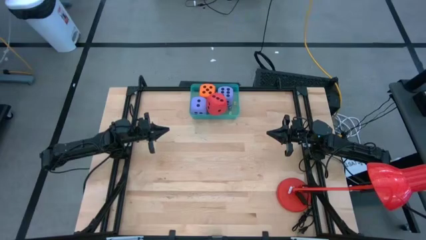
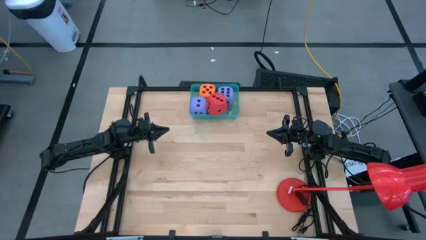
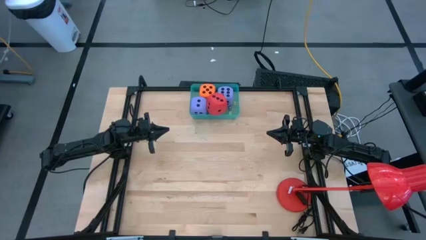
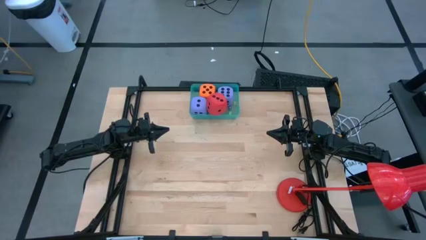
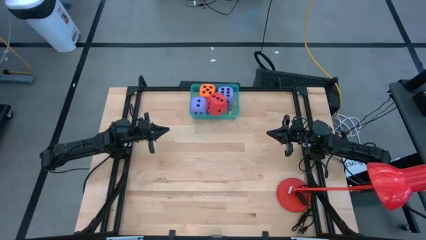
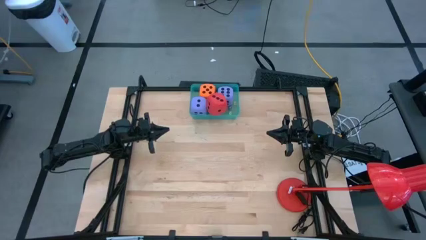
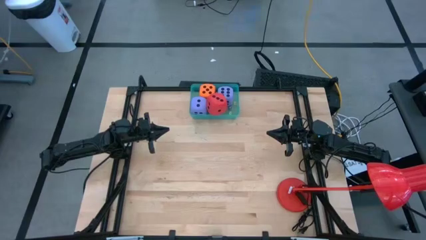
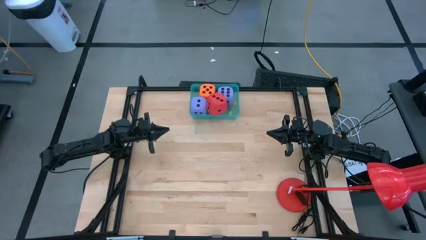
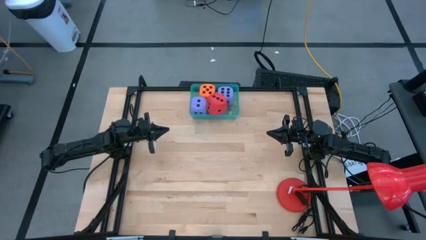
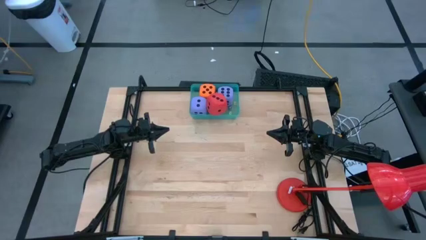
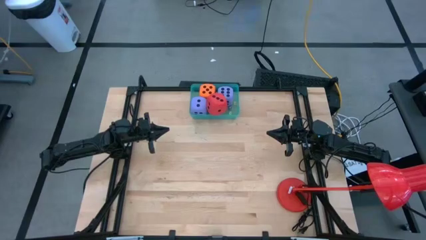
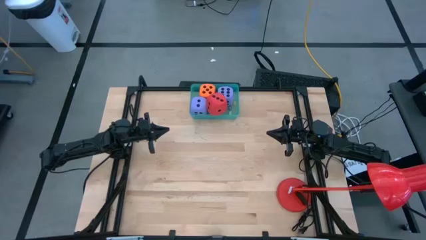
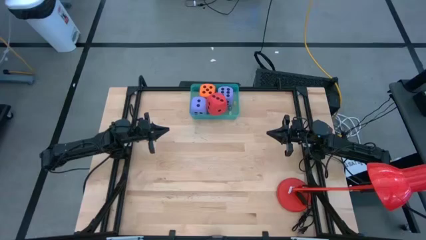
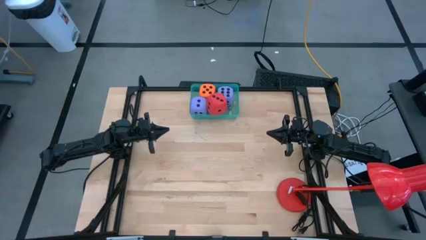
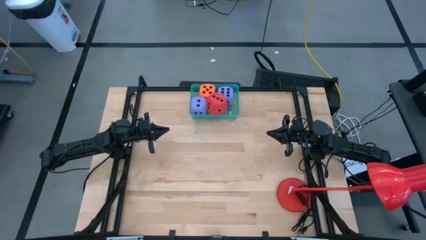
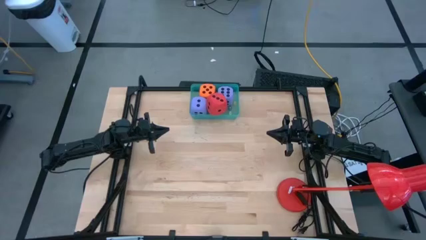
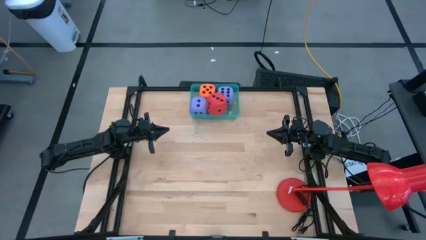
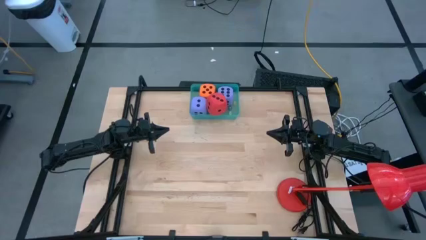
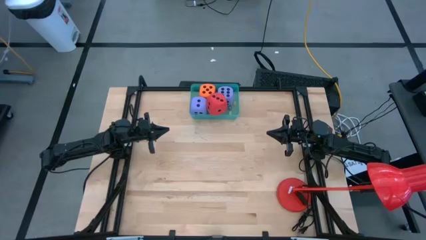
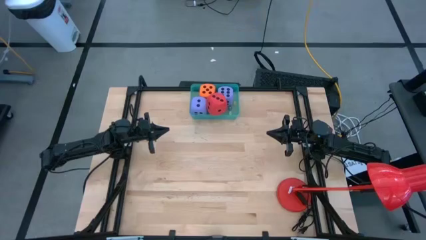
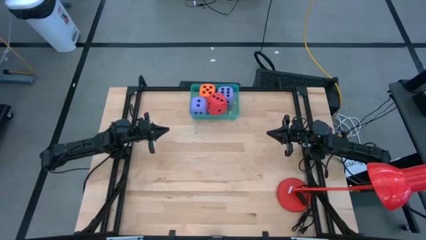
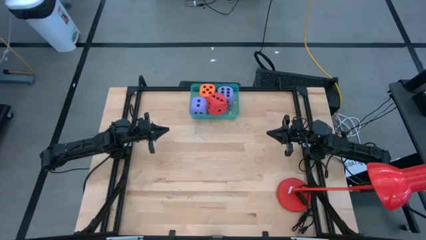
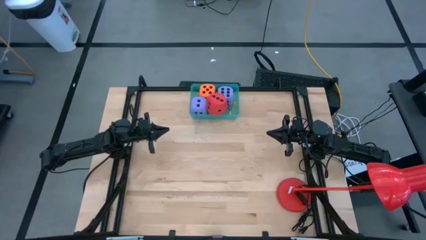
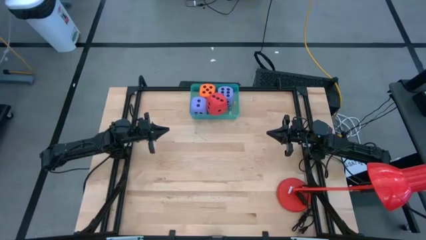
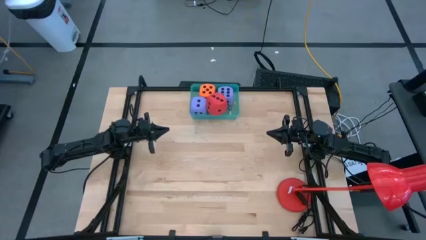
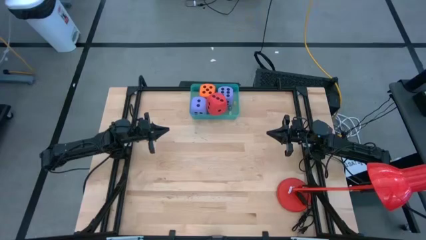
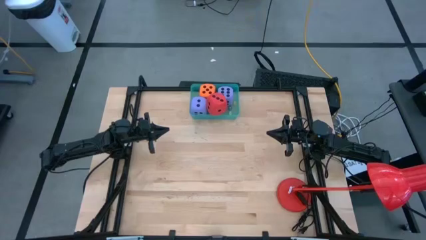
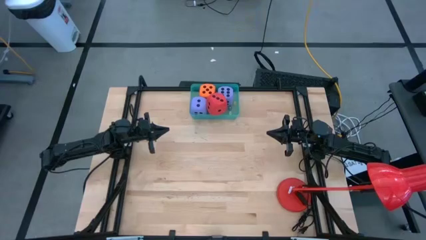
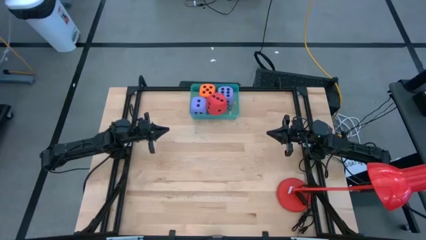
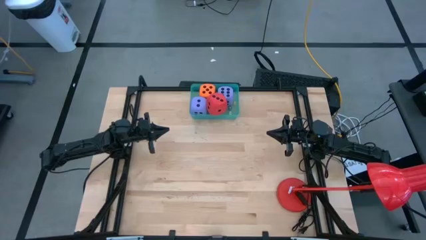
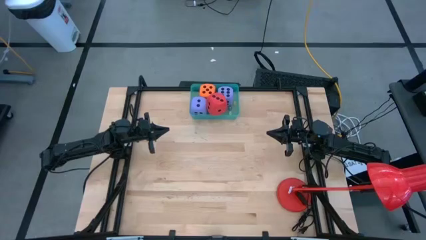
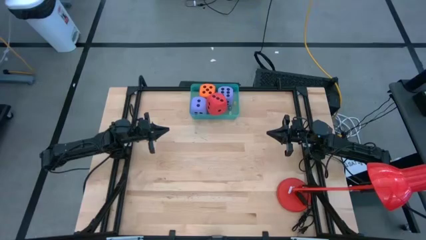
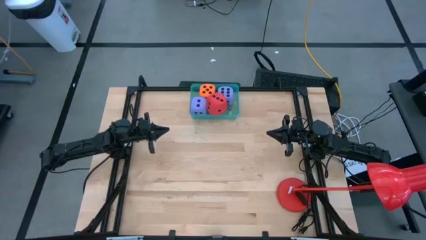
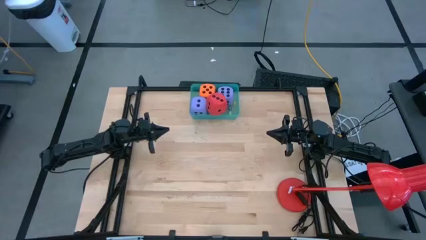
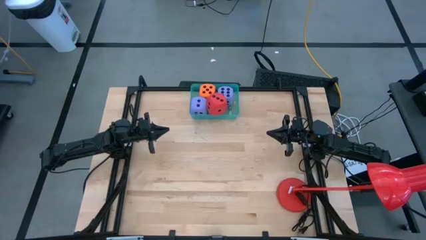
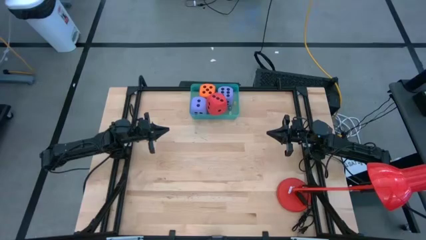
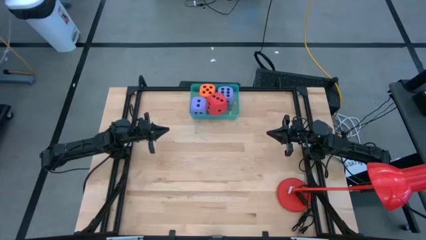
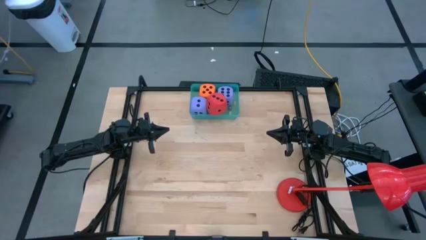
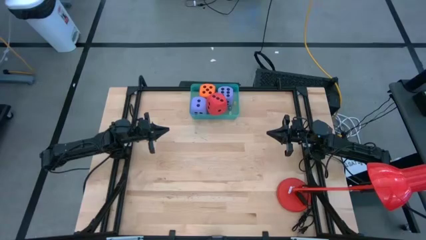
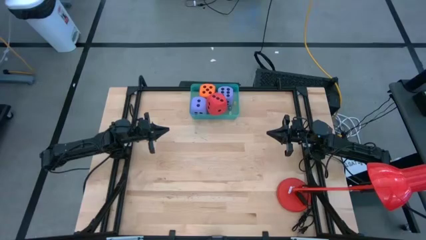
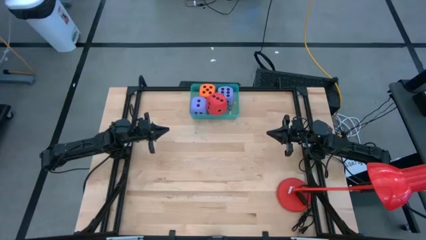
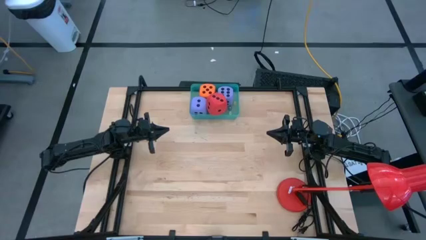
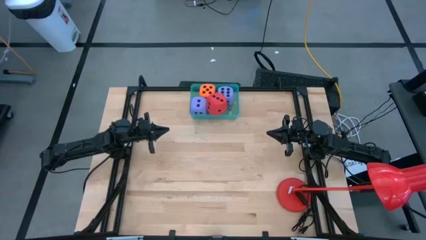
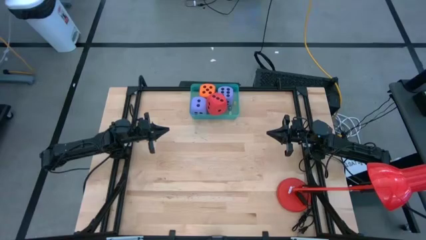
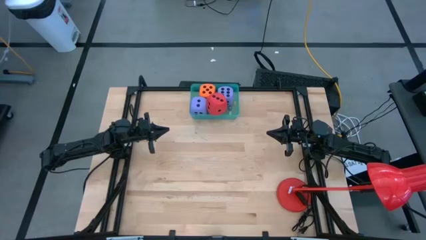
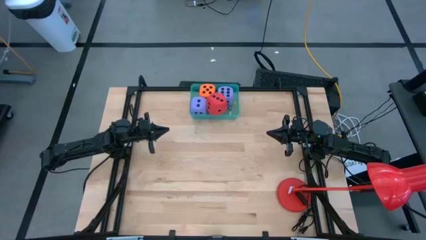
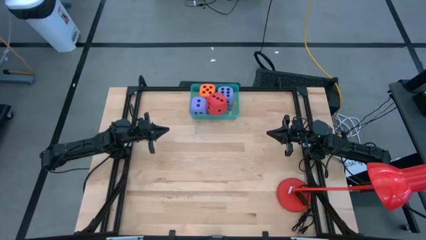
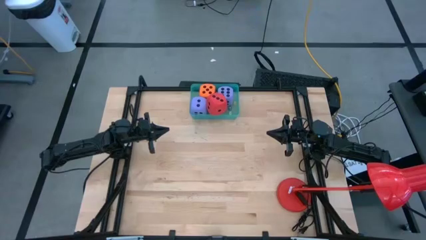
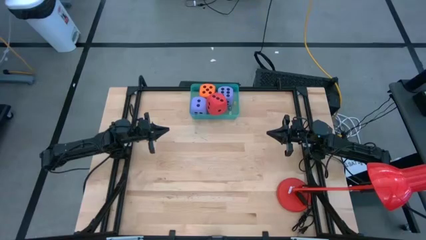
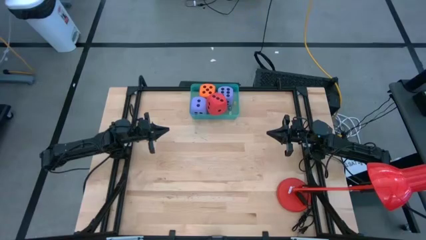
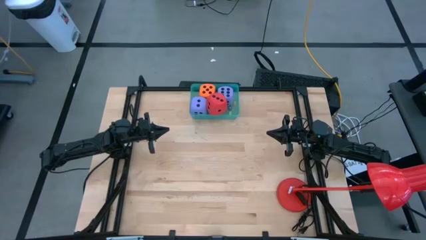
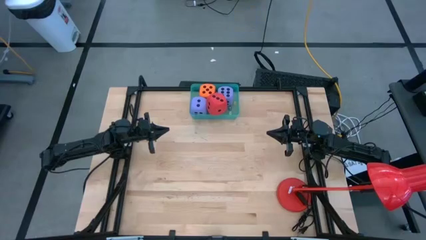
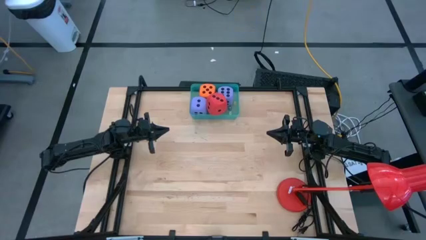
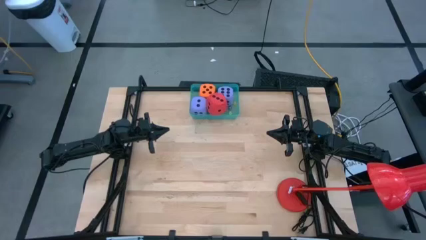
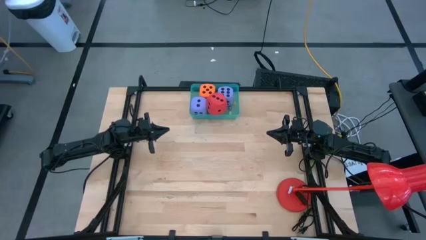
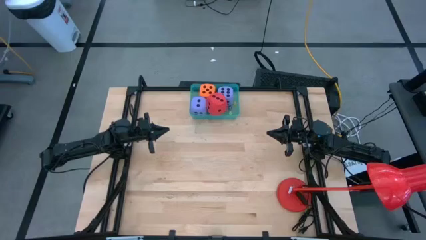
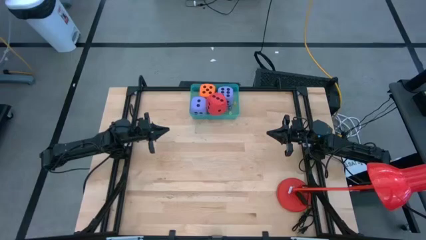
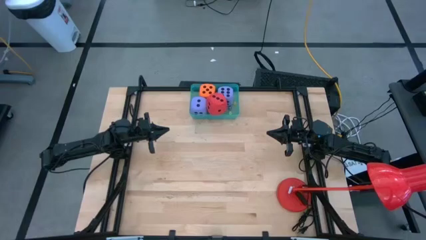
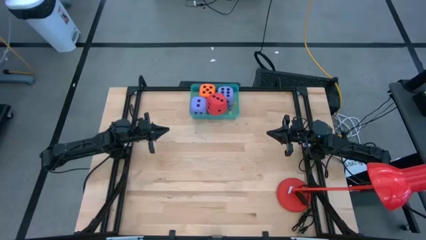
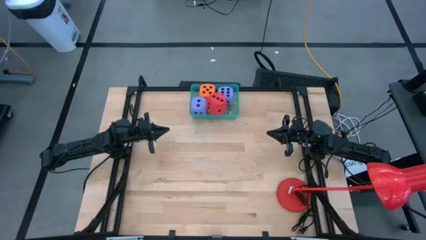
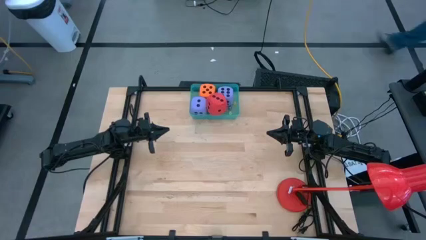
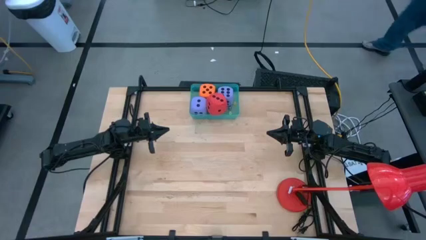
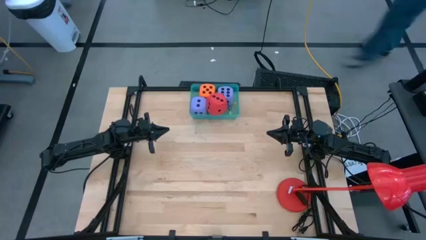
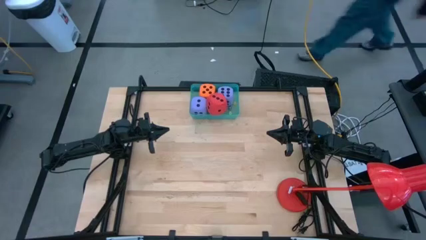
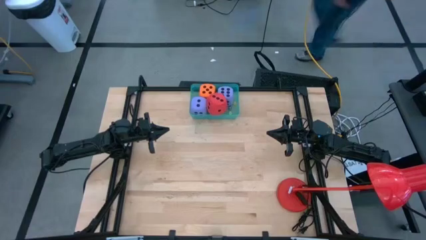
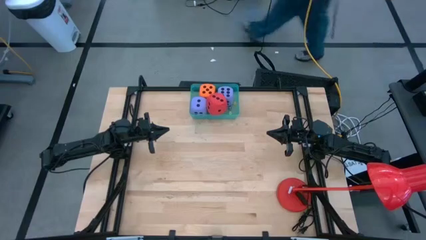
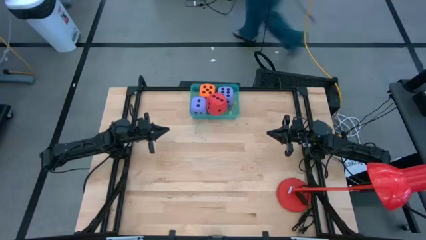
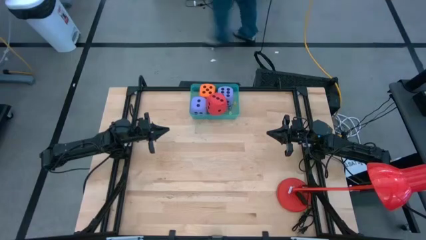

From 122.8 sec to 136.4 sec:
Task: Pick & Place Dice
Return to Home Position

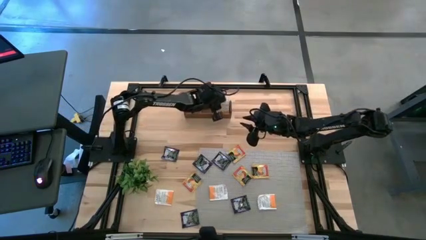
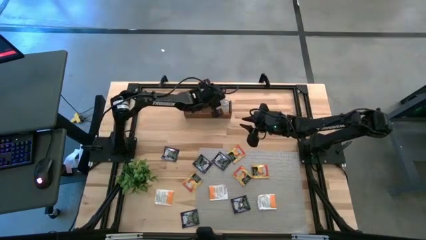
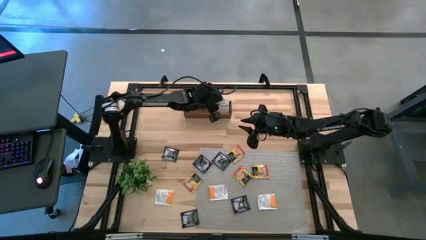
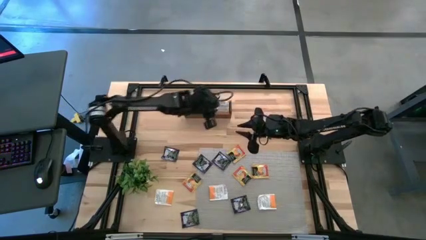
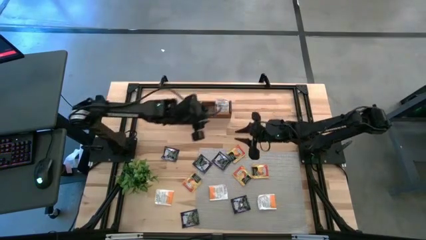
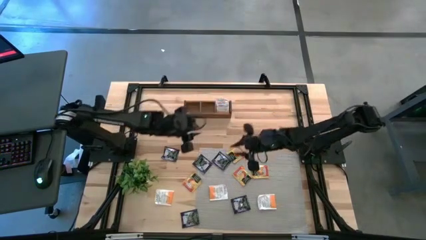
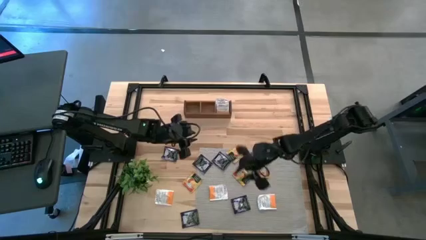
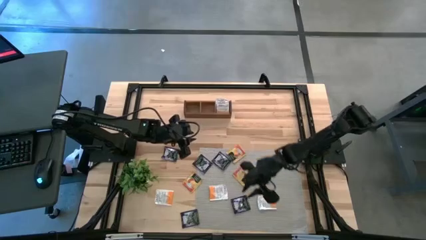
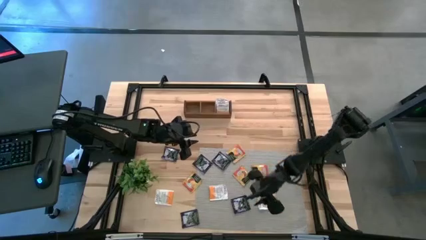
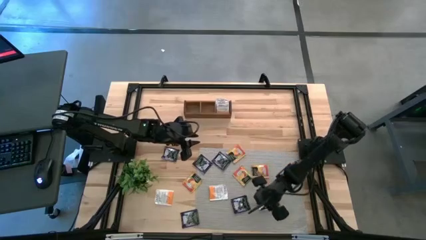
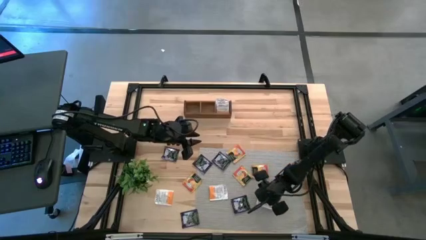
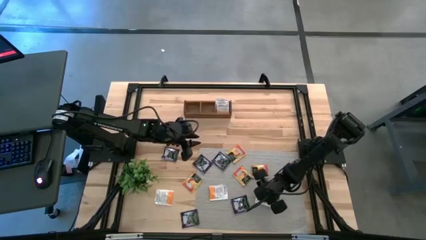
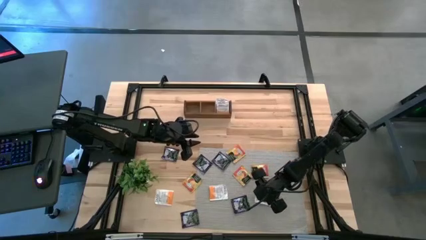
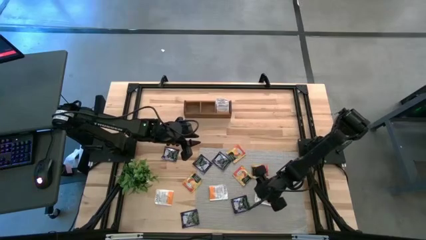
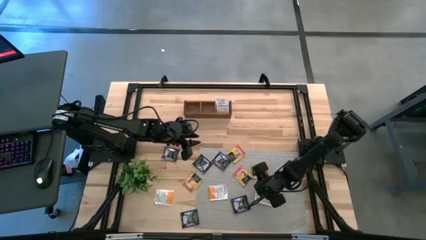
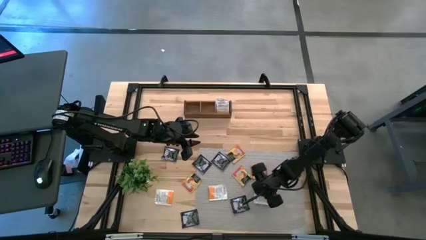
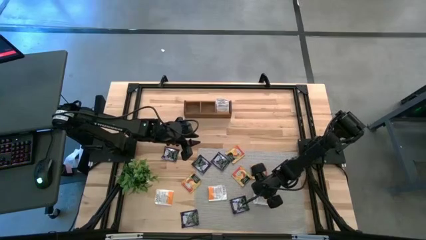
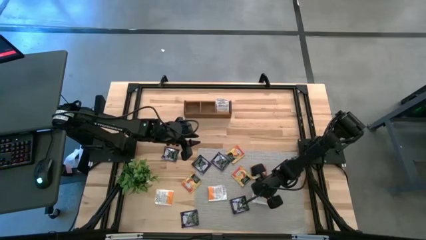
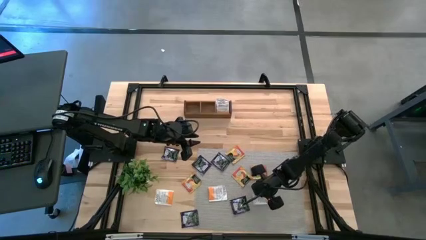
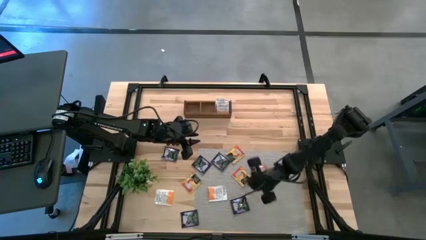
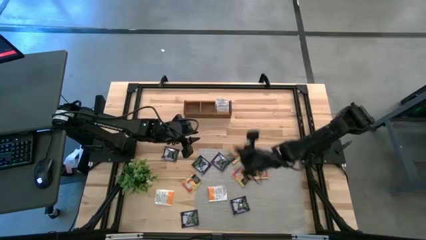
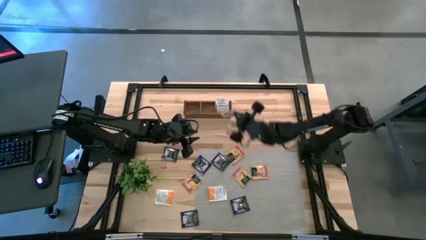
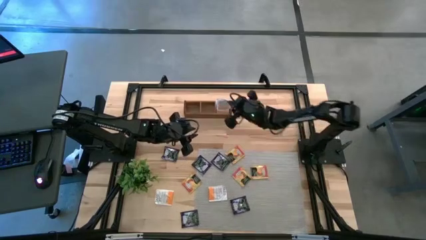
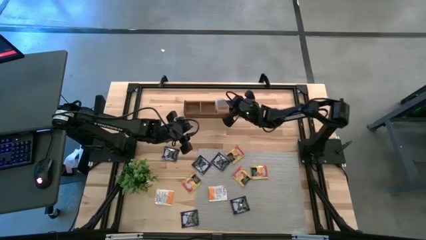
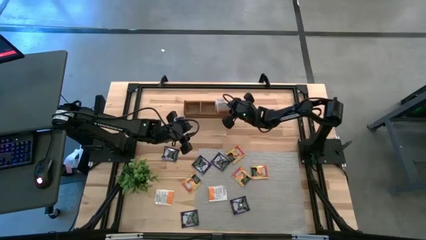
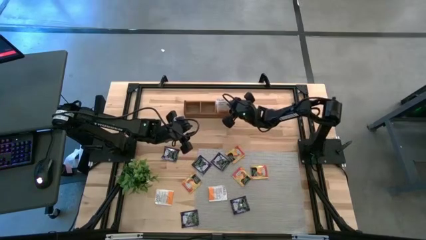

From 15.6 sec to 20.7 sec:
Task: Pick & Place Tea
Put the white tea bag into the right section of the wooden organizer
